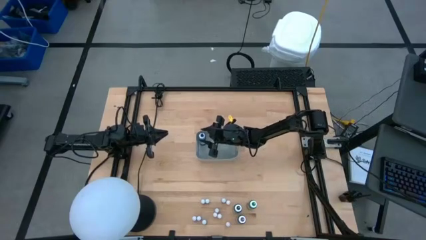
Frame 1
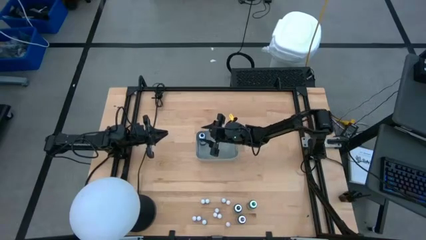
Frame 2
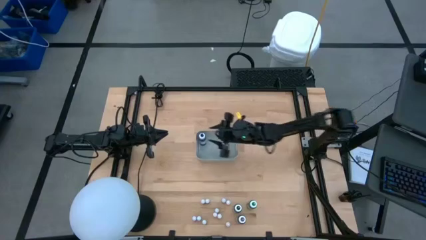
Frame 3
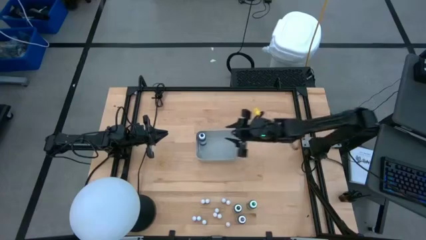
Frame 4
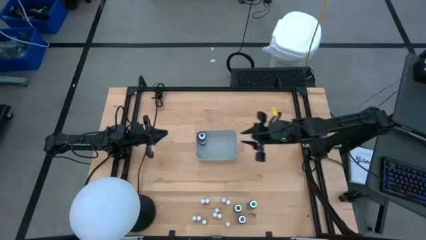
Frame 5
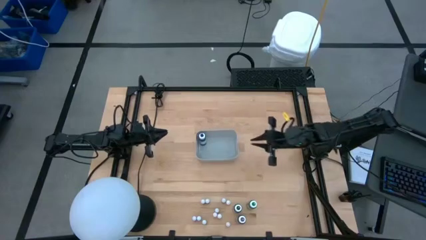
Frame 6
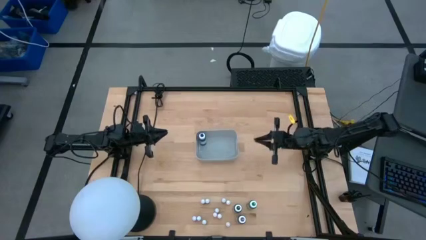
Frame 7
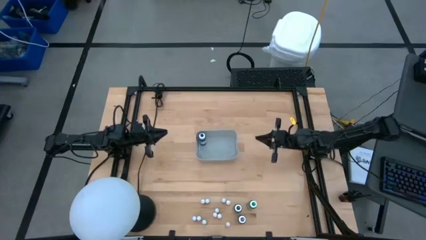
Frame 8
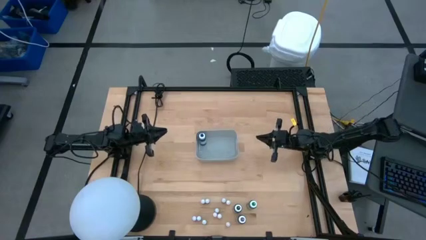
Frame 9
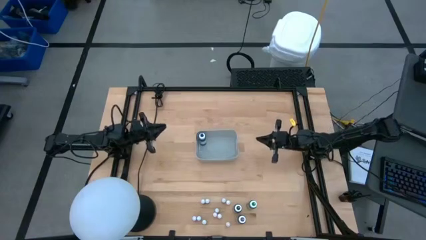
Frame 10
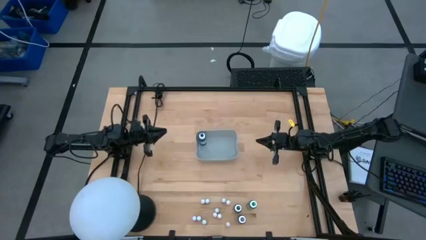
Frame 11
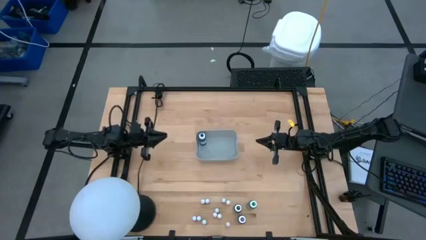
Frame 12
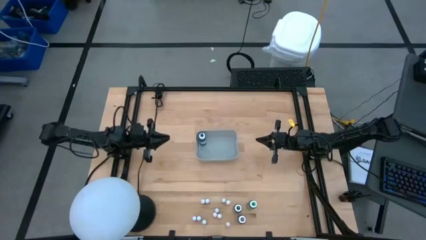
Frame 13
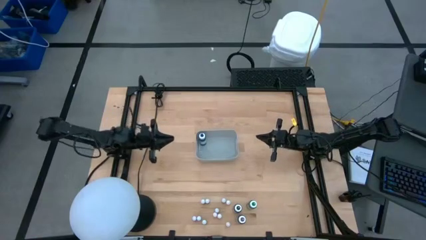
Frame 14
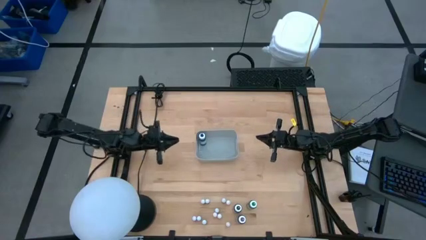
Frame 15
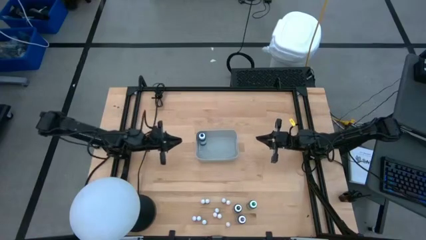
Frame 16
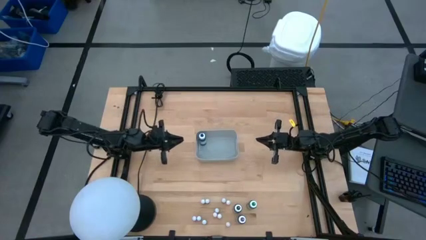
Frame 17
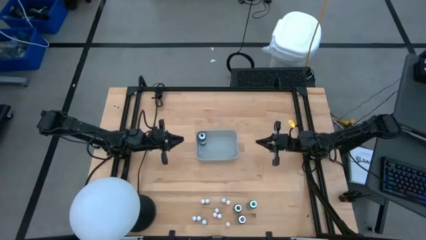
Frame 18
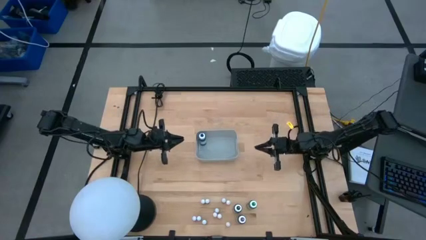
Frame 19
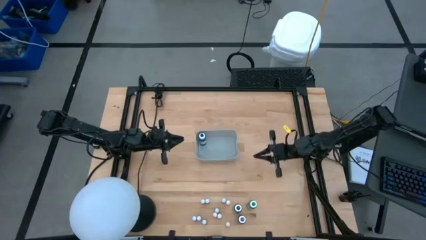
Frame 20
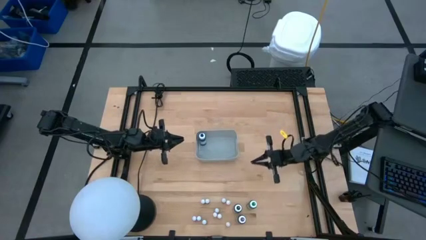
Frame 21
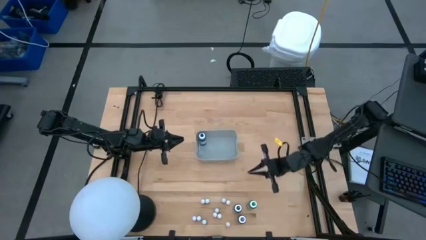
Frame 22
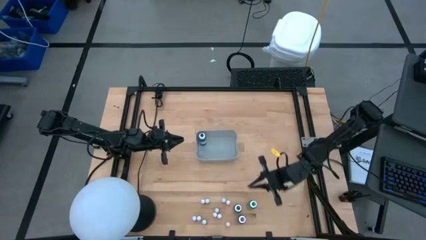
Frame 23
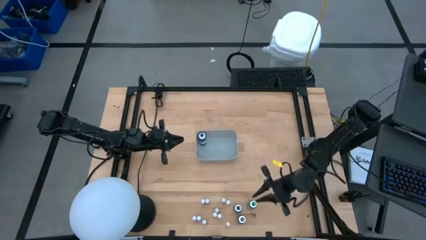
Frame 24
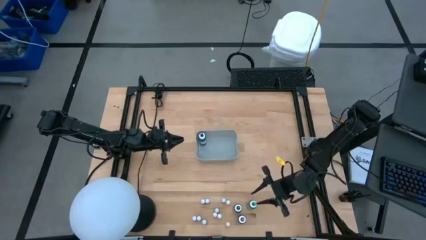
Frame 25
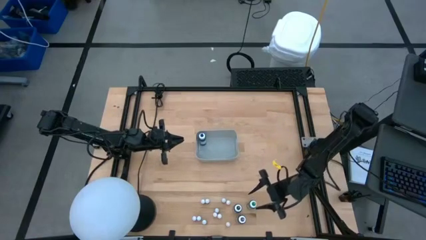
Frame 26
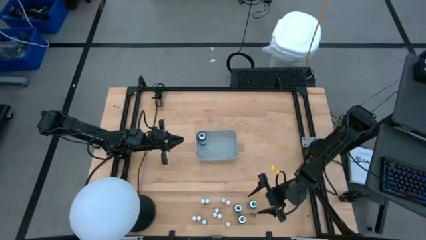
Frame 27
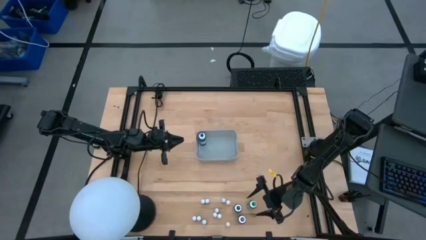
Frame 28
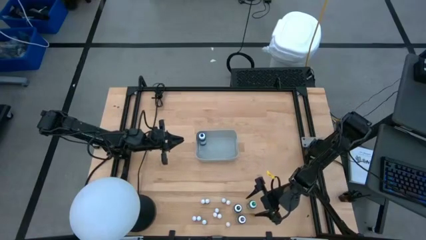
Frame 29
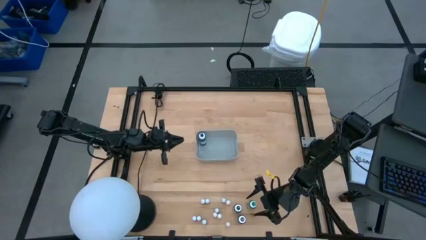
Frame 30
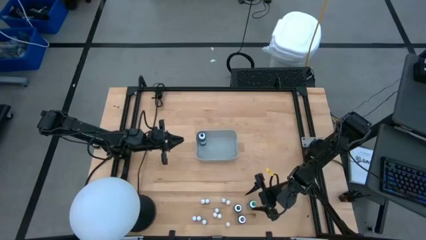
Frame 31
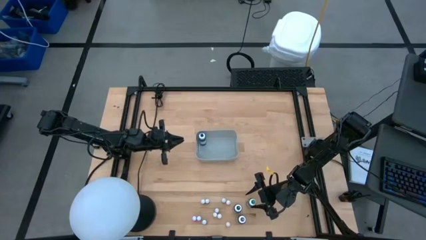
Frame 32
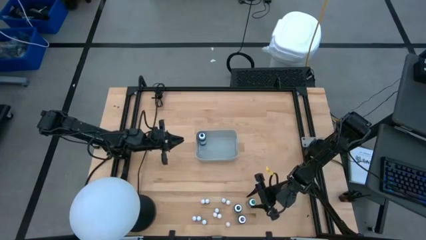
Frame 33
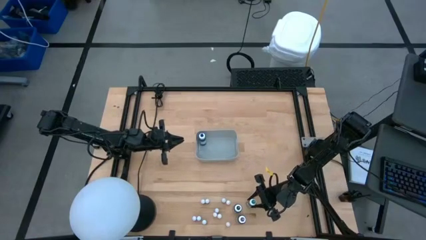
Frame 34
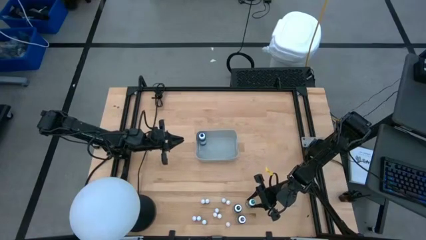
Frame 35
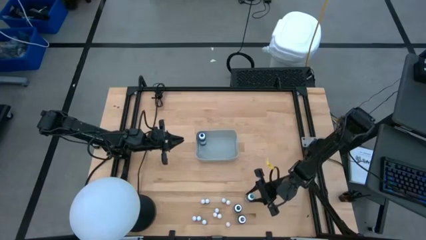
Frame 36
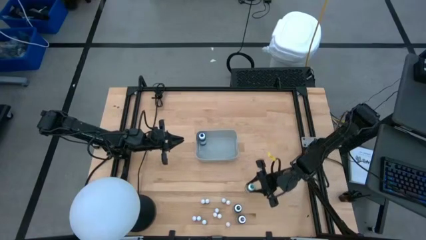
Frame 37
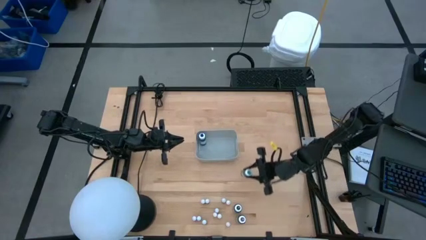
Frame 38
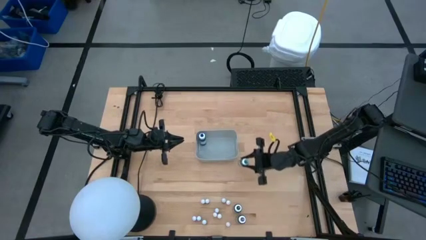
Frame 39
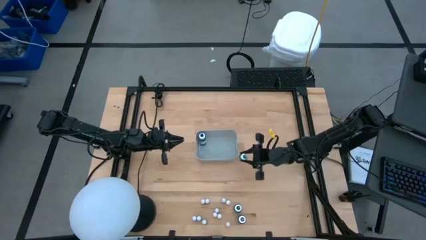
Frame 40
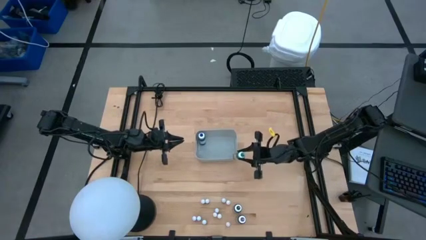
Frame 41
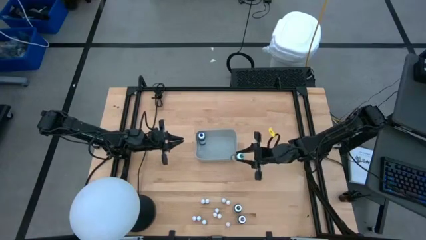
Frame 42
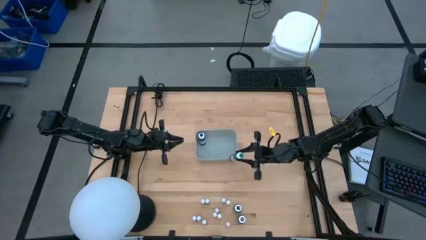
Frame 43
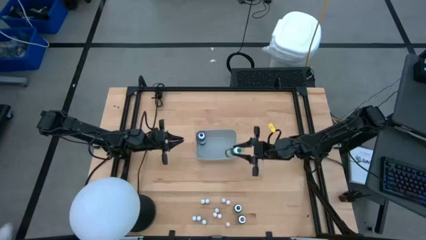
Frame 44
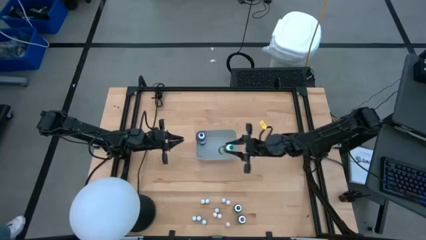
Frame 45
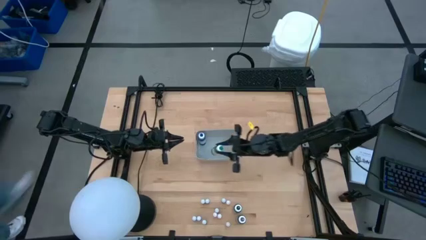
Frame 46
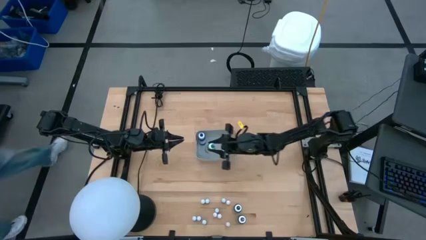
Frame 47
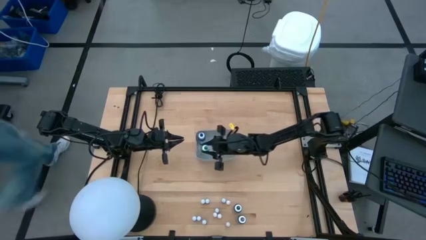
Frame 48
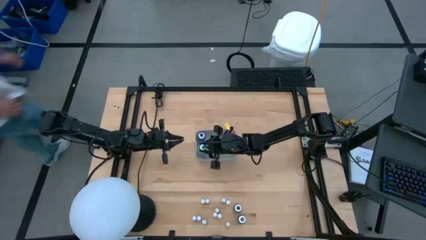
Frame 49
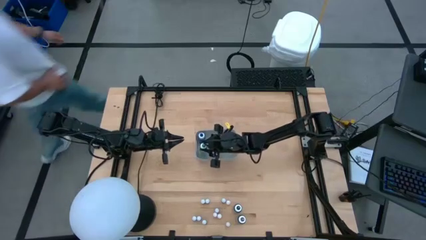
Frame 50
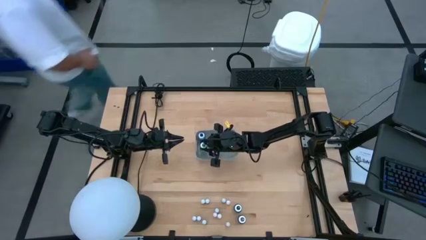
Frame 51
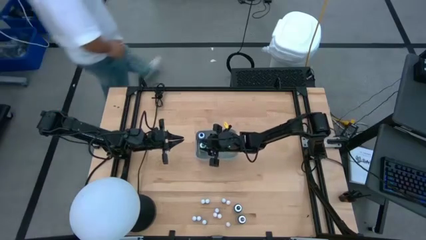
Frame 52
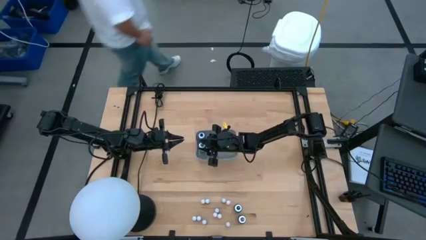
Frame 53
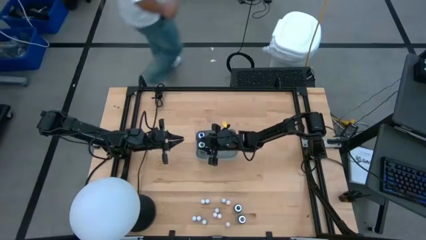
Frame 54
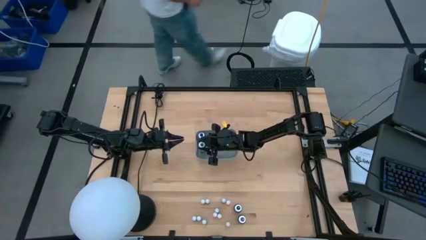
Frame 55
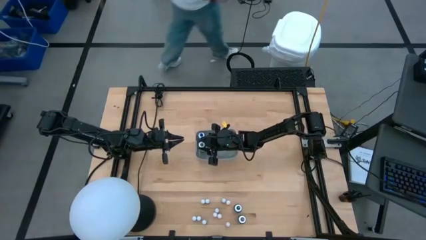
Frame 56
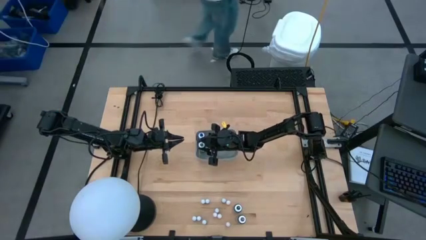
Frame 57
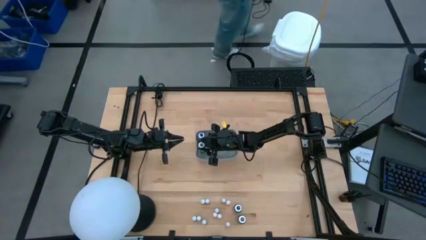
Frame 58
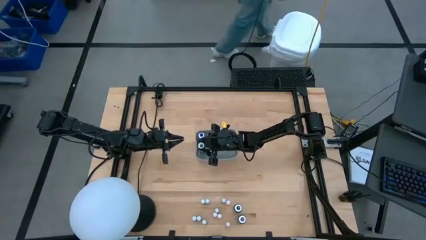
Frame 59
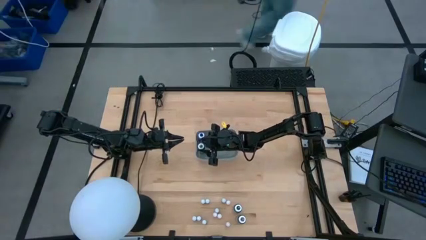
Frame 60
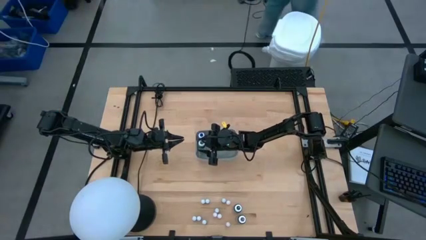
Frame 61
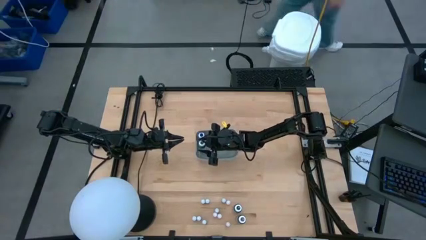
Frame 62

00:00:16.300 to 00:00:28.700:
Task: Pick & Place food coloring
Put the large green food coloring bottle into the gray bin

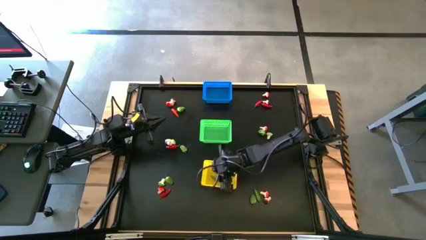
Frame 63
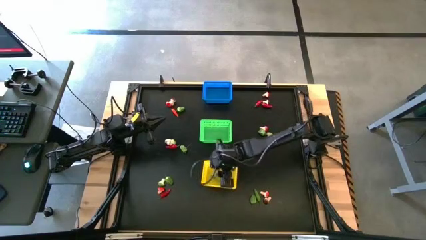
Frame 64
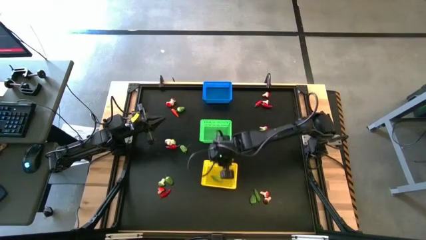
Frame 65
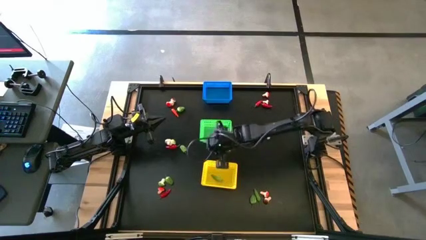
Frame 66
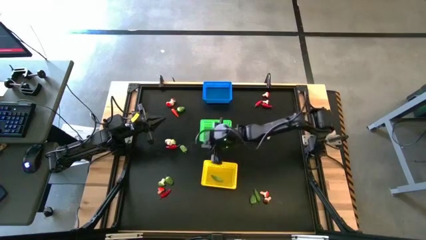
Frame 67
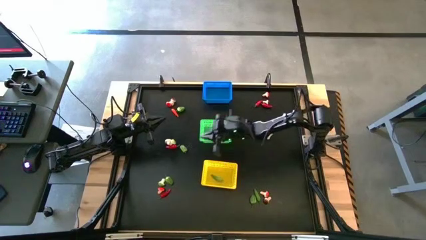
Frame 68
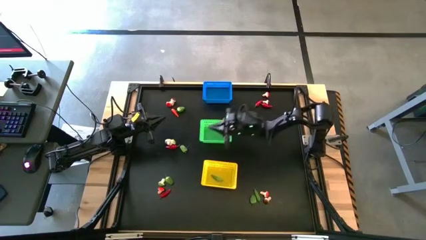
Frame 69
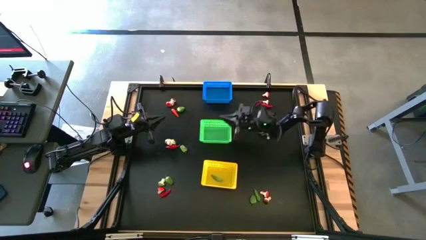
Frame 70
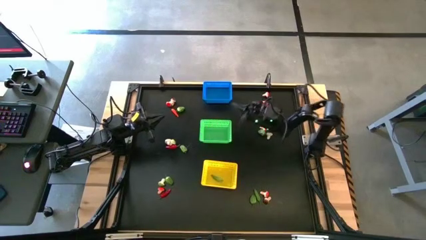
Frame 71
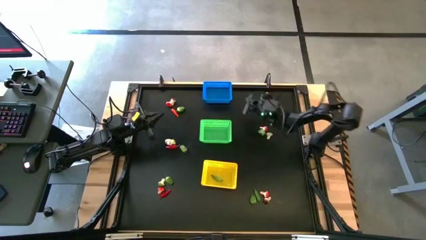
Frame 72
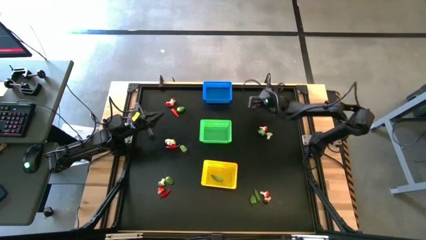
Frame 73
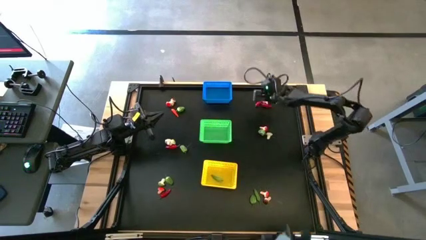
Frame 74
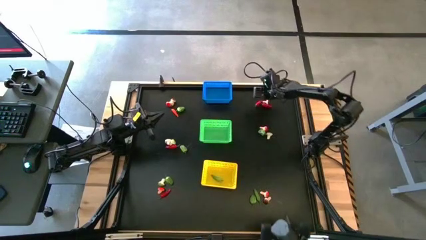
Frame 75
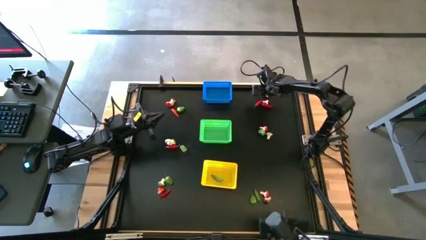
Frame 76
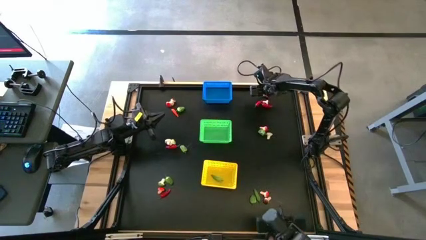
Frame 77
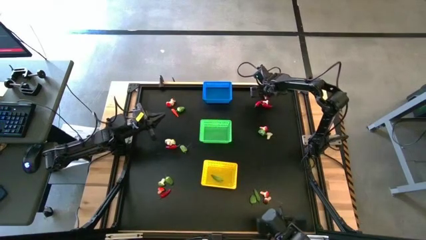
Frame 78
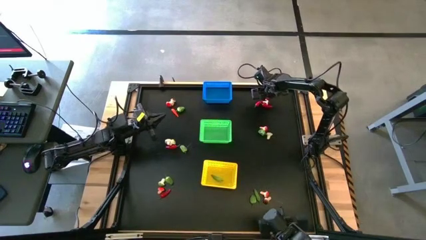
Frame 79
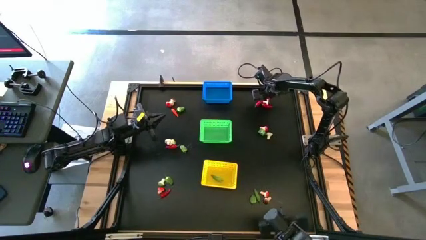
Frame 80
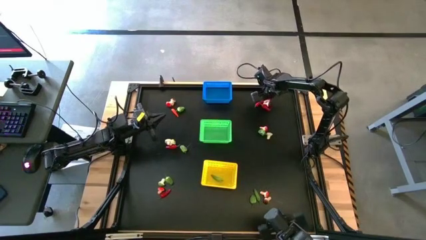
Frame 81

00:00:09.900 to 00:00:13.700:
Task: Sort produce into baskets
Put the red mushroom into the blue bin

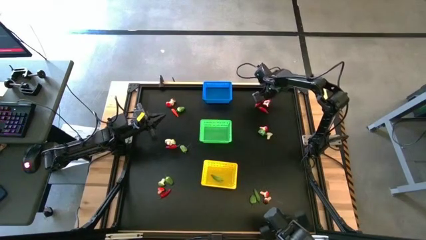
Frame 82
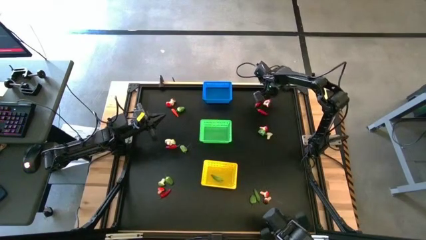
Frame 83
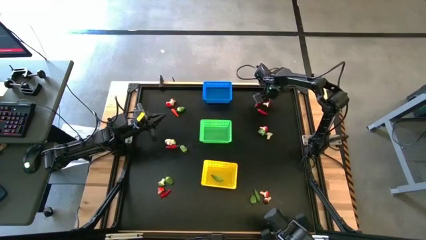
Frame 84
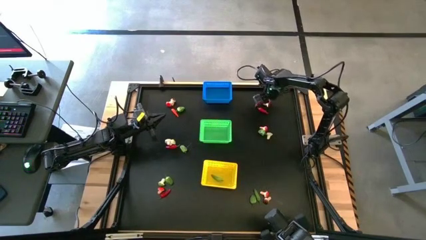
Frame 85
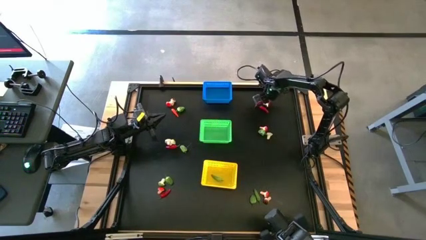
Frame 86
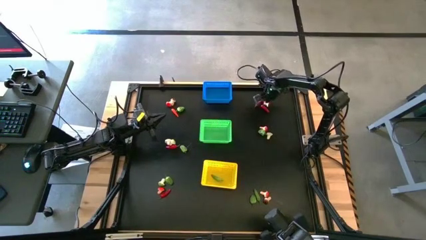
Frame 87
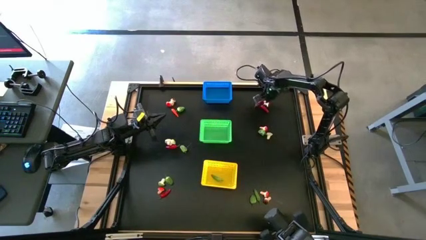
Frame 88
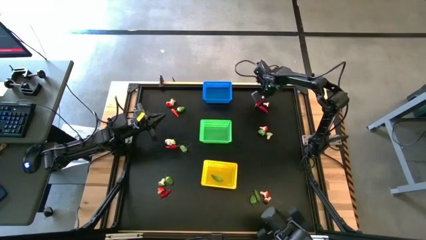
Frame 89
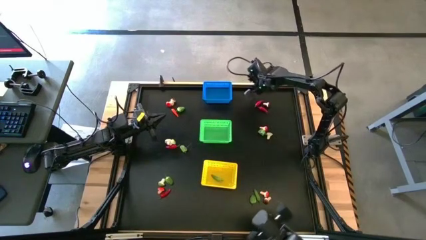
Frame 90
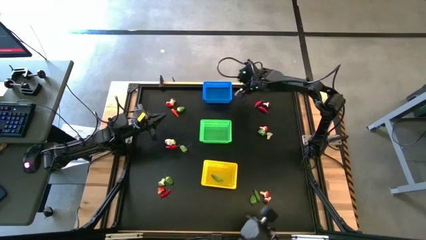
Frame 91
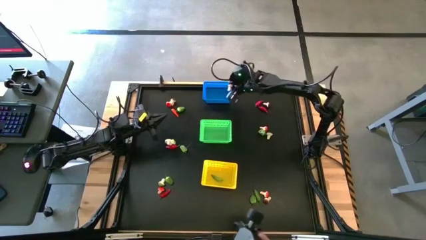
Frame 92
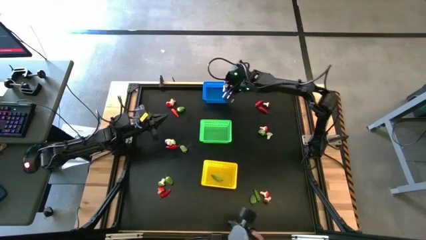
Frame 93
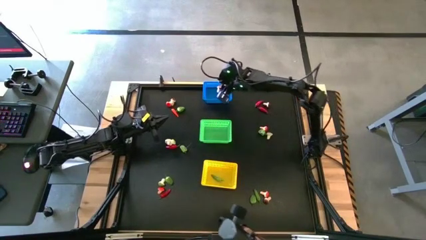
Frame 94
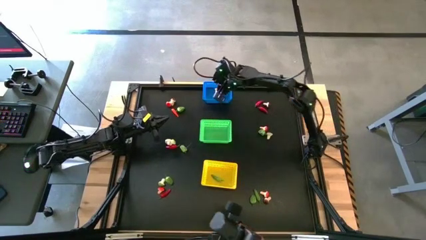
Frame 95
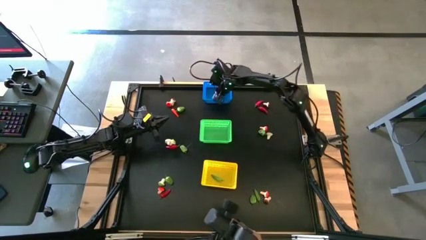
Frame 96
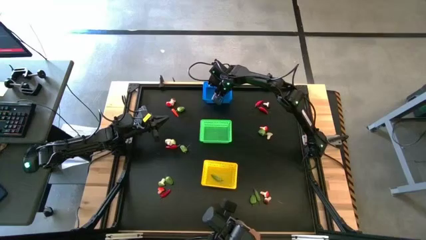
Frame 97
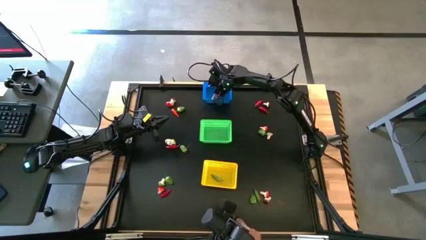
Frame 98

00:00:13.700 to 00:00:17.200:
Put the red mushroom into the blue bin
